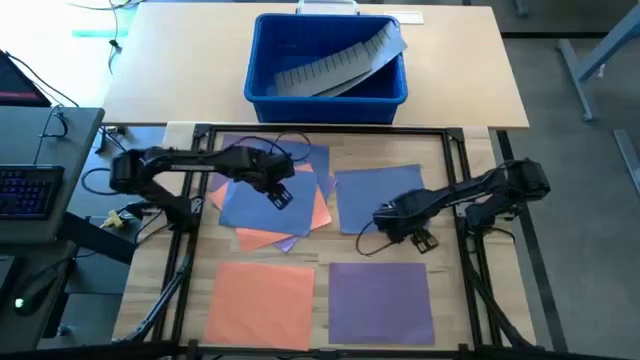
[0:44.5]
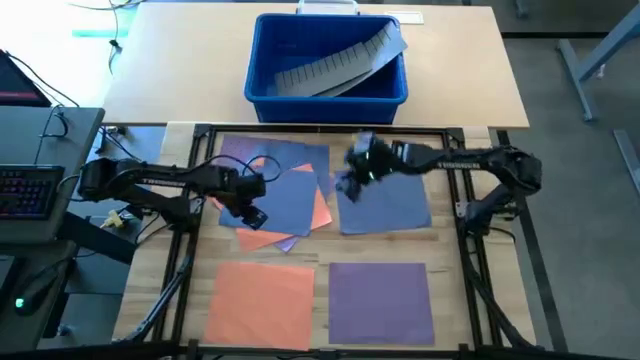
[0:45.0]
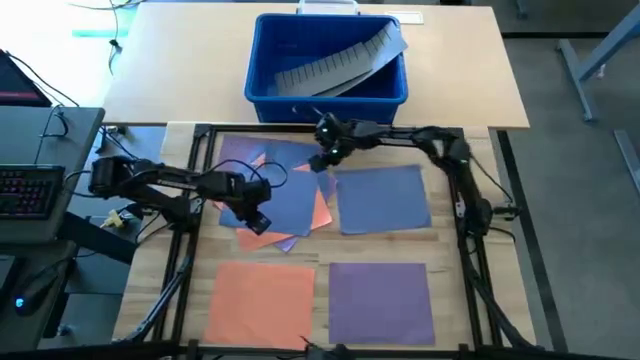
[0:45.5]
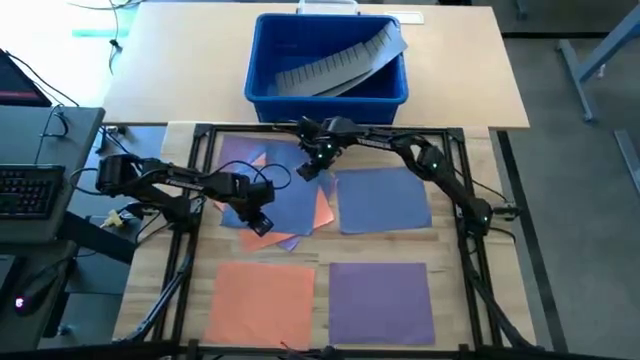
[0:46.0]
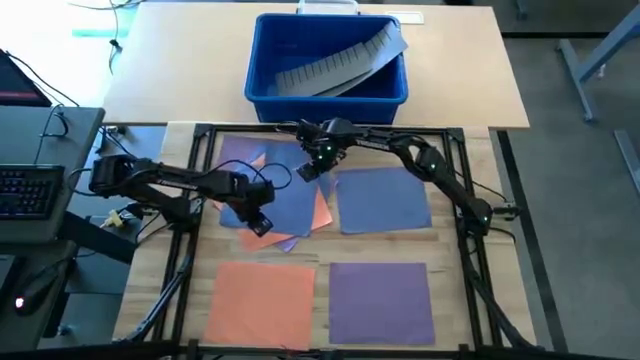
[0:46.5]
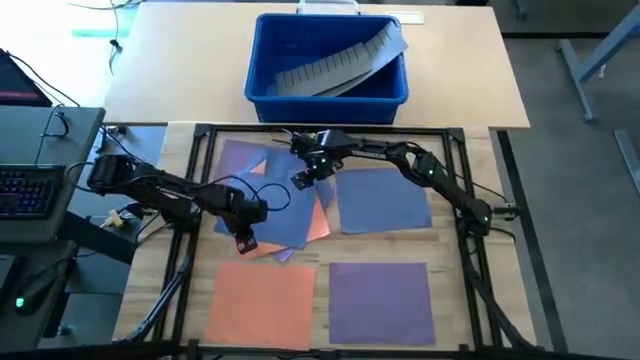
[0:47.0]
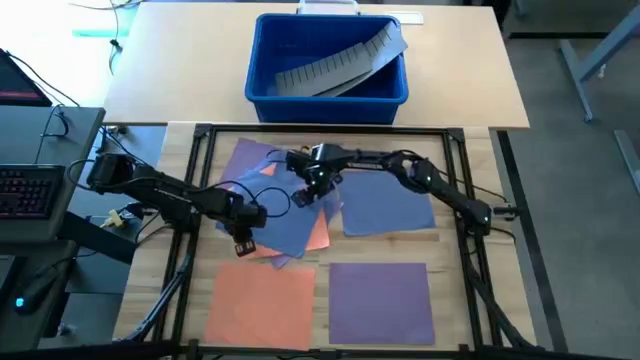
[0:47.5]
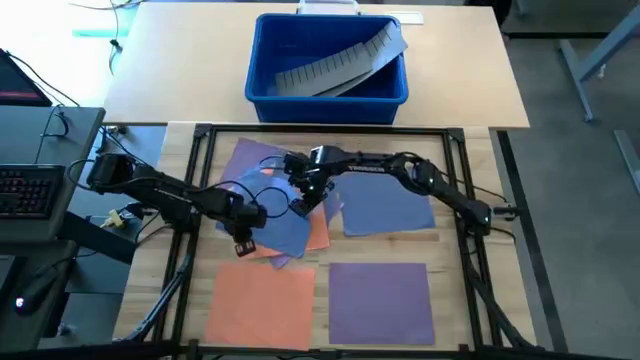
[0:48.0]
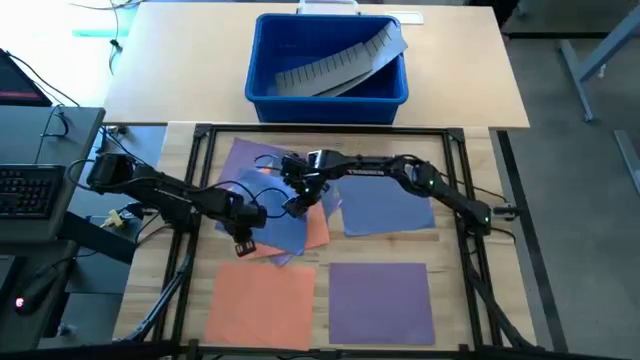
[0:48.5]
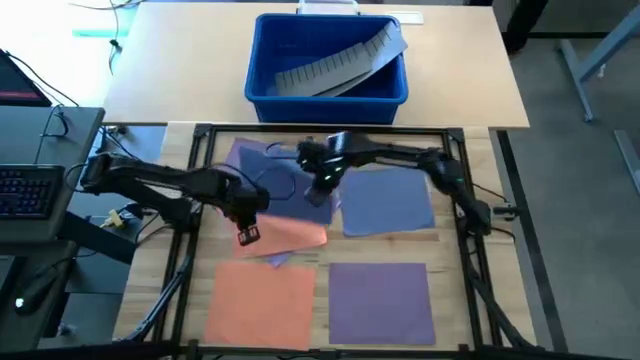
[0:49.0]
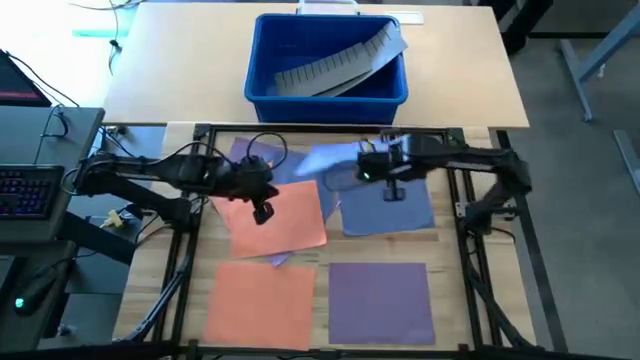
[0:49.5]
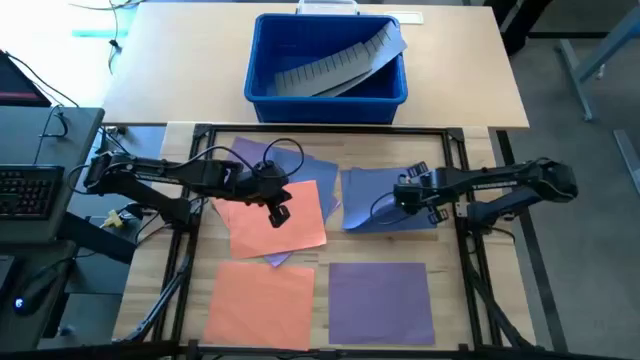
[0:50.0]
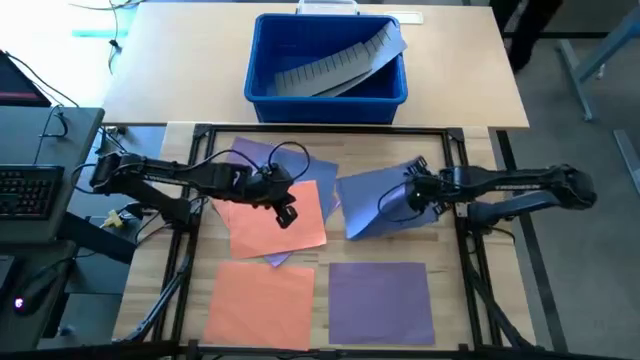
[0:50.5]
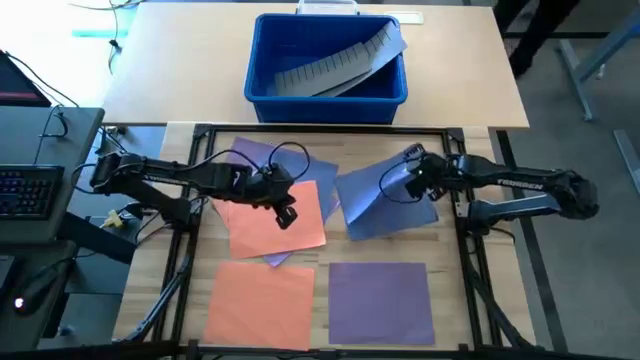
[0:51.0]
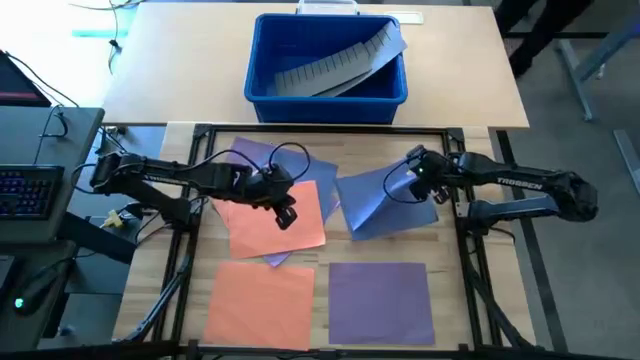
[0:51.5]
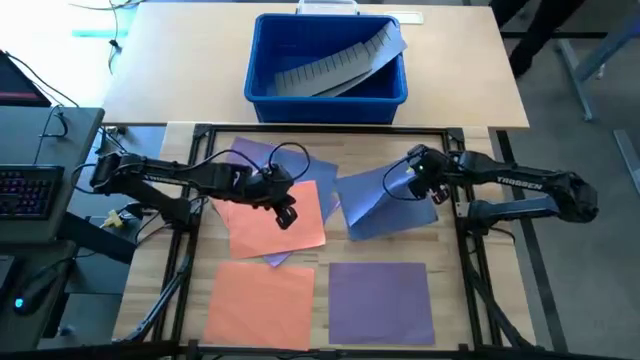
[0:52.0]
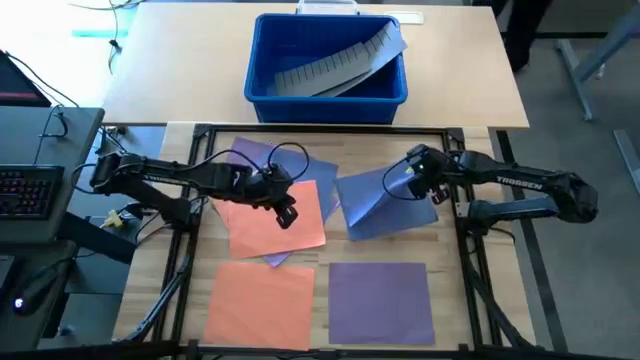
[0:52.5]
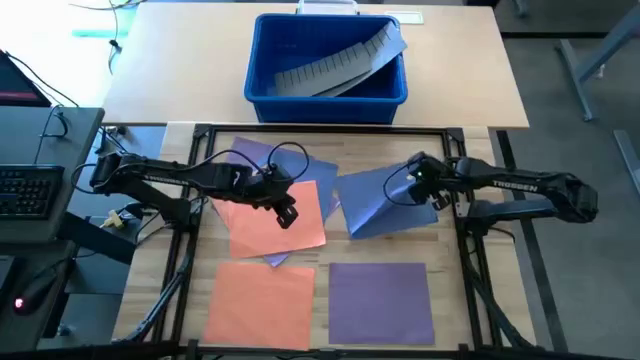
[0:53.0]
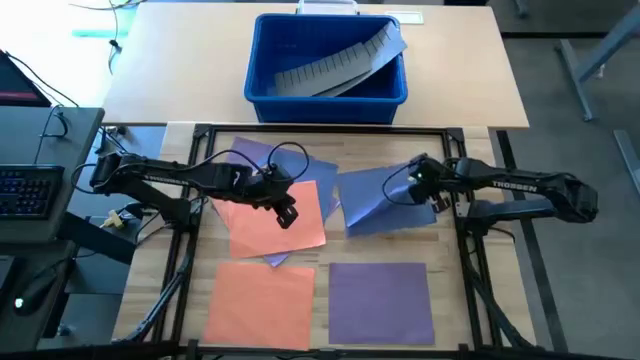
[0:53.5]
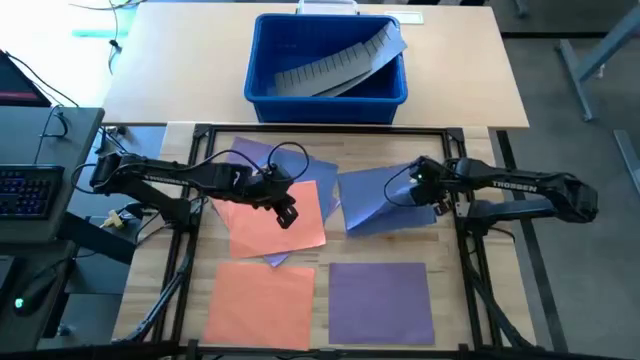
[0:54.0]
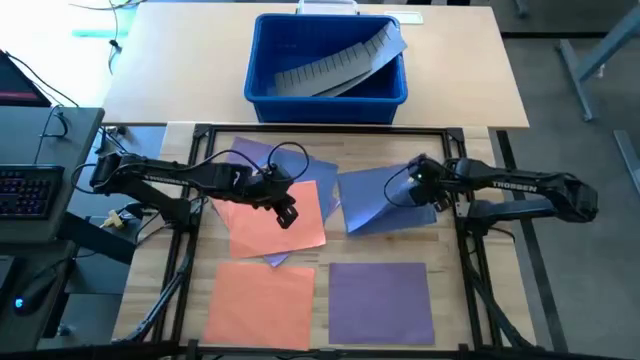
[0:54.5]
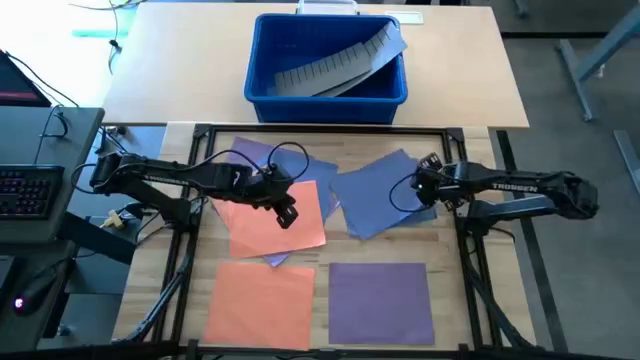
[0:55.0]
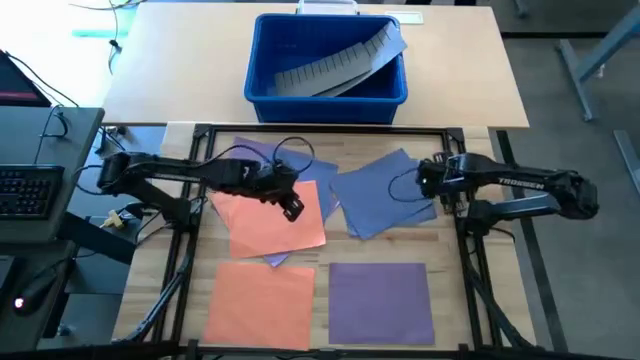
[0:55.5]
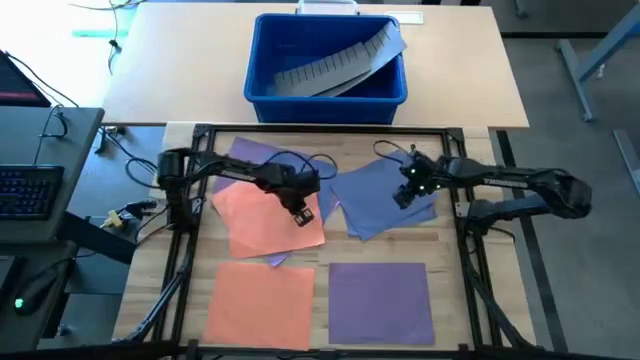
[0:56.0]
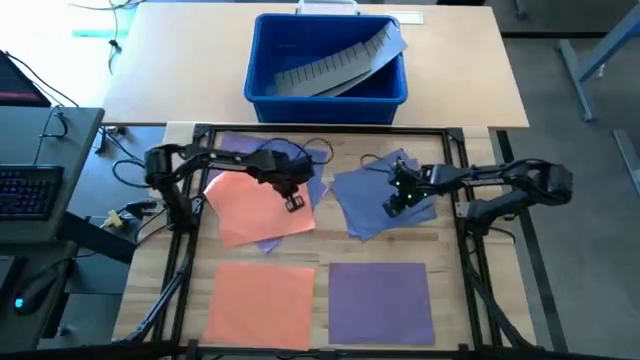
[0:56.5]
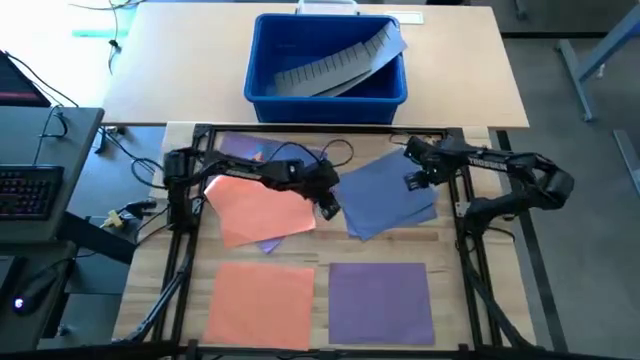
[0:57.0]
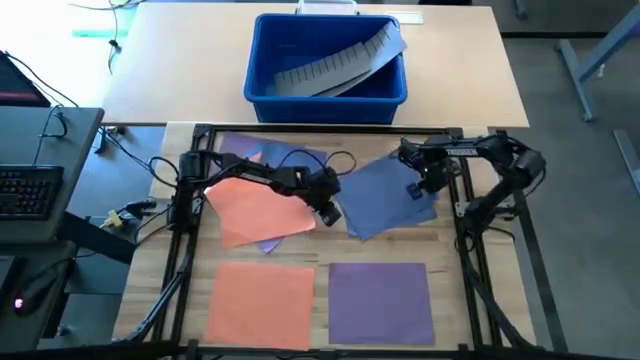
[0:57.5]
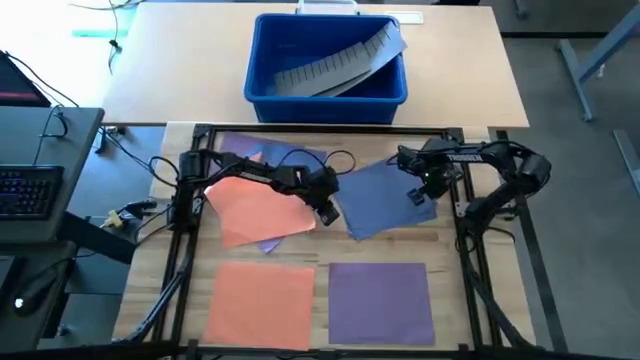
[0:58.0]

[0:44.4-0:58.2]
Task: Organize paper
Stack the blue paper on top of the blue paper

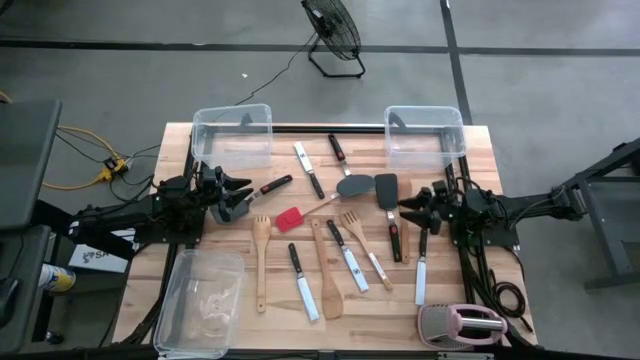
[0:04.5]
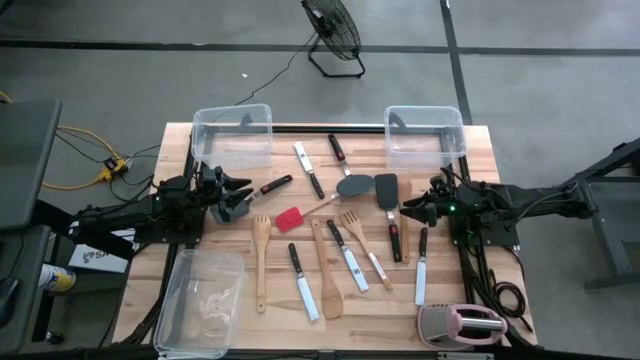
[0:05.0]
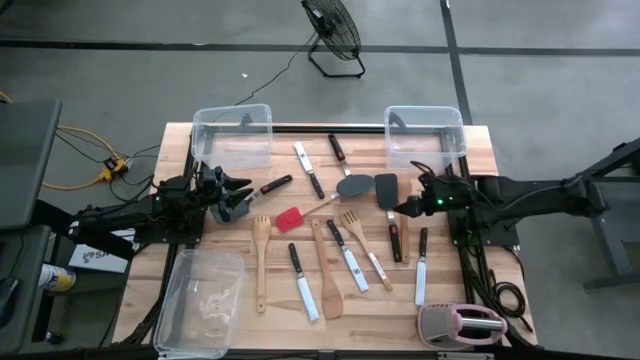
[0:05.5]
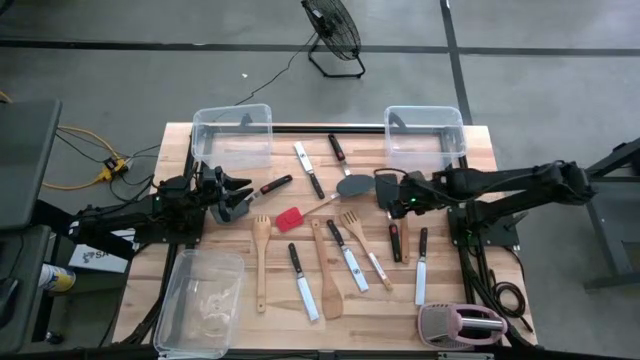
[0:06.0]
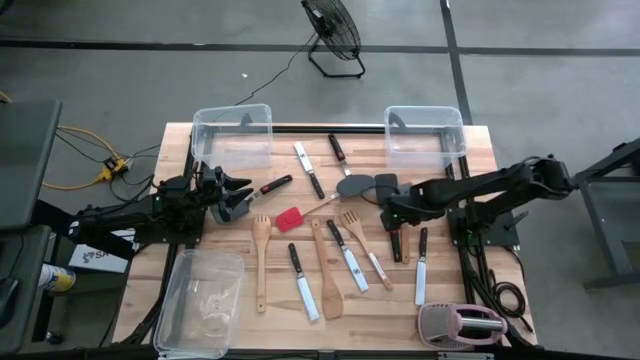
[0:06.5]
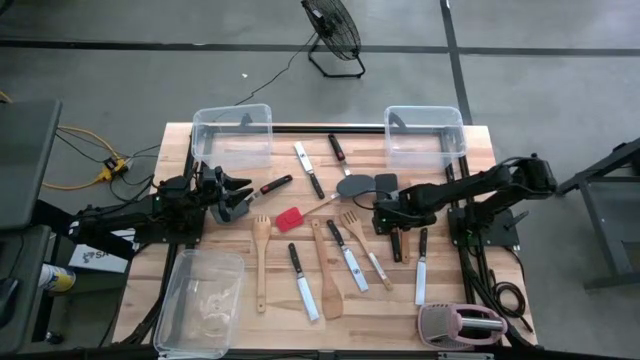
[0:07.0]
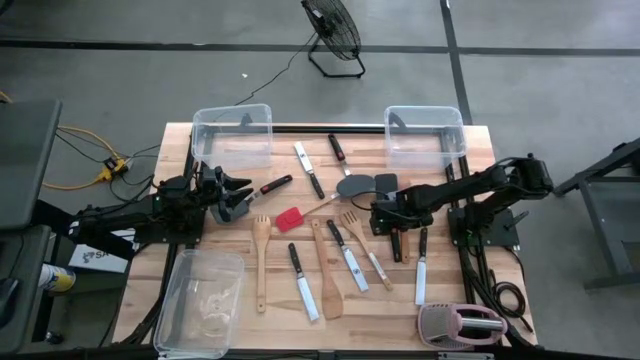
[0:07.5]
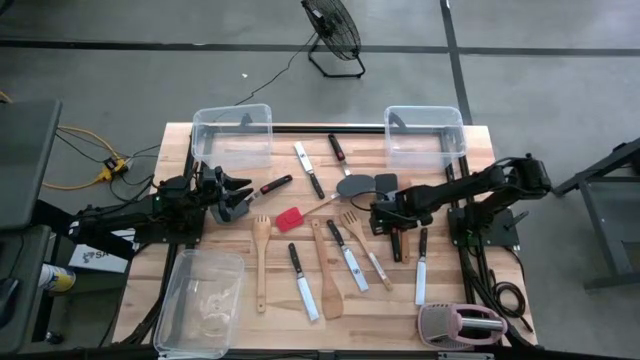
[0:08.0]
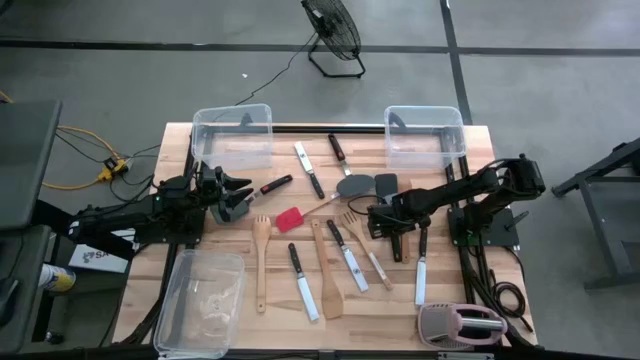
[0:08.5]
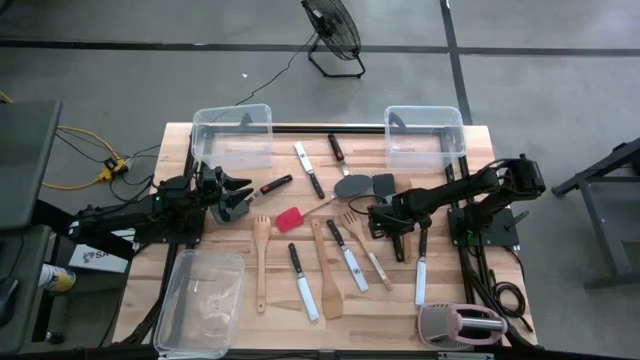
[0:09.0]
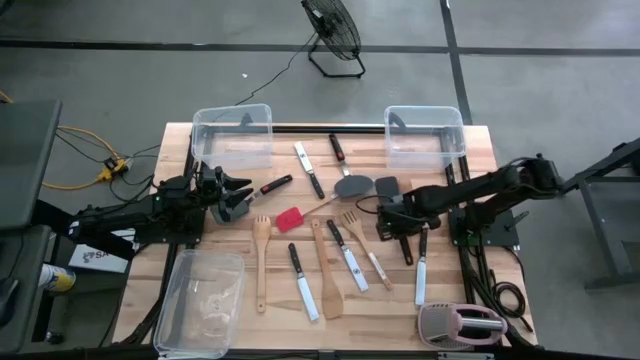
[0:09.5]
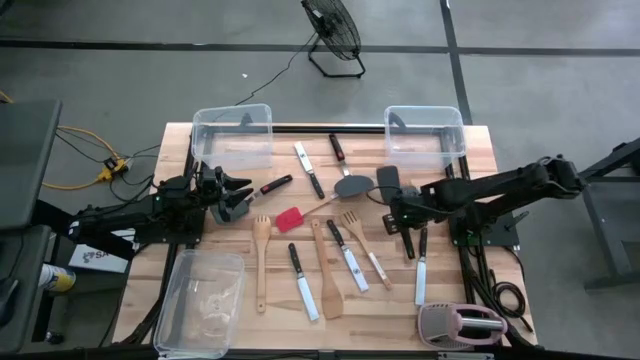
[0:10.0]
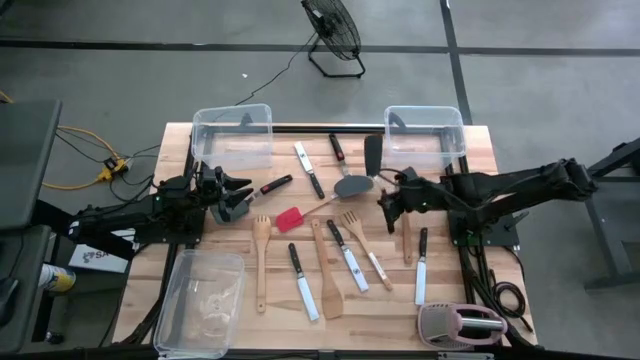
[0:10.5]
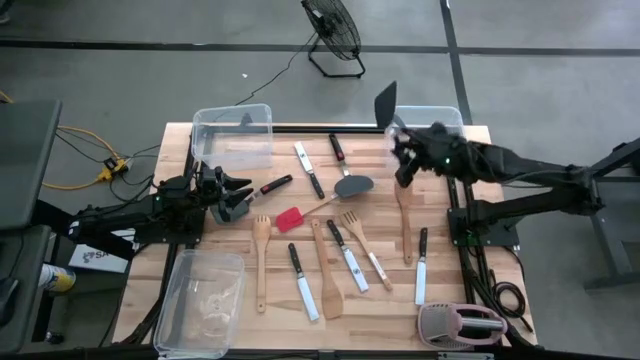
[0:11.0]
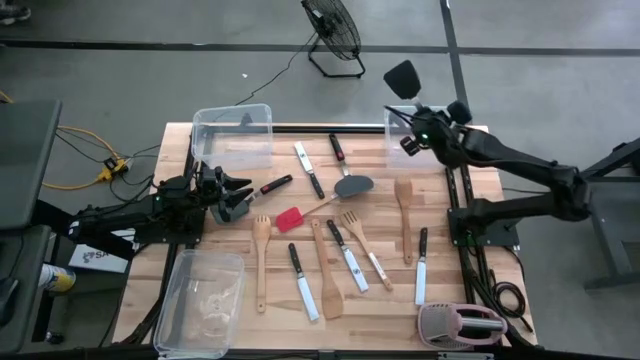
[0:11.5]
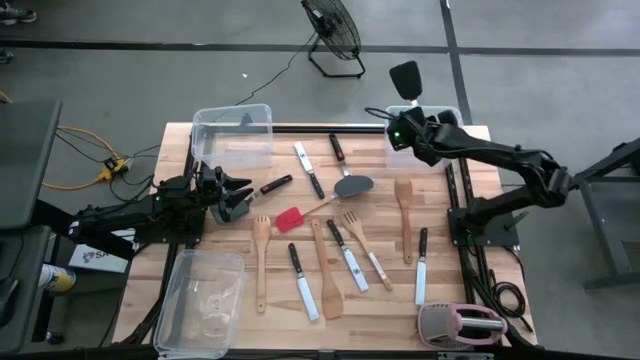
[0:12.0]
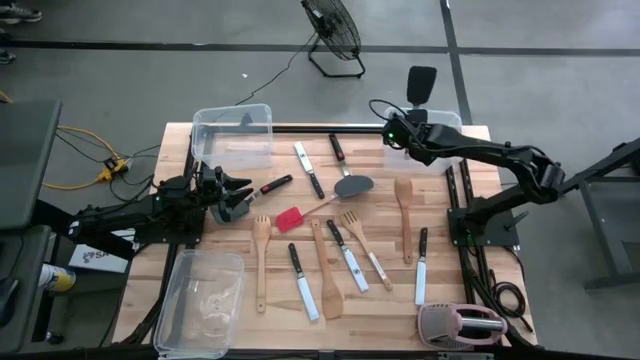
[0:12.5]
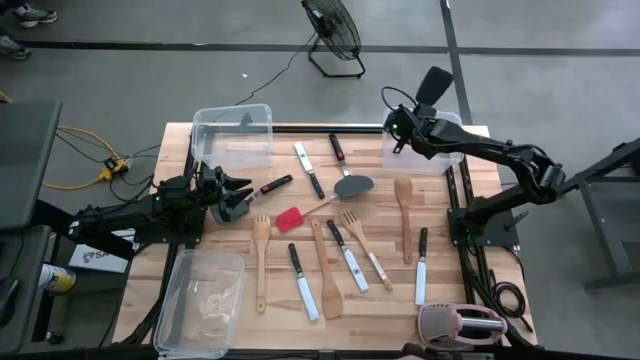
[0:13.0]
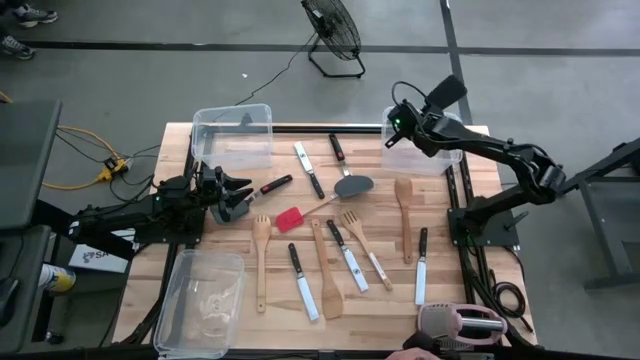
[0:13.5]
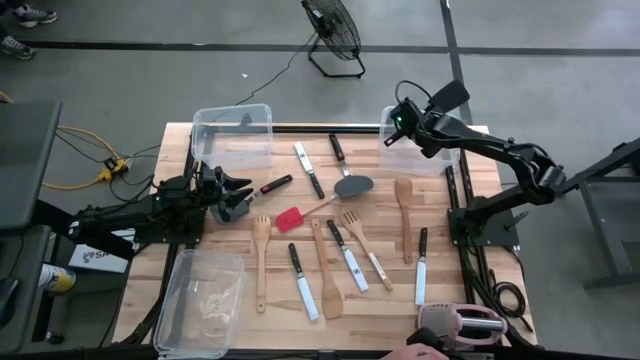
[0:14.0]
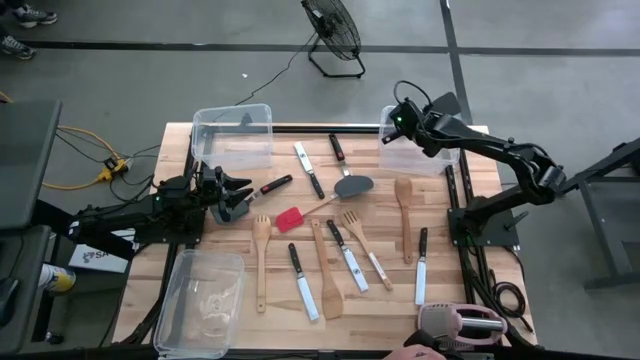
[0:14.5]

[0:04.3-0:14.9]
Task: Pick & Place Kitchen Items
Put the right black spatula into the top right transparent bin
